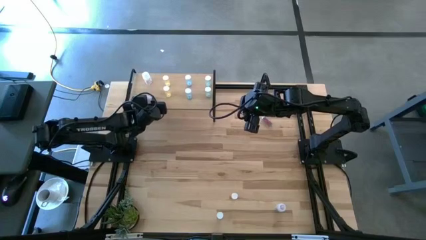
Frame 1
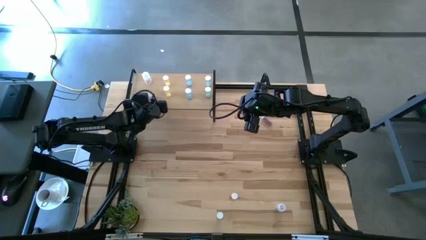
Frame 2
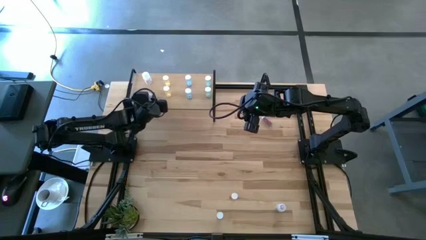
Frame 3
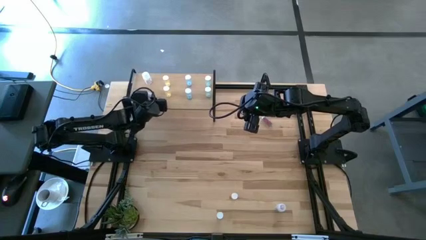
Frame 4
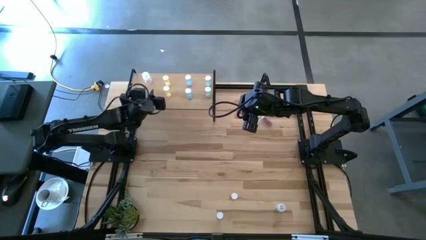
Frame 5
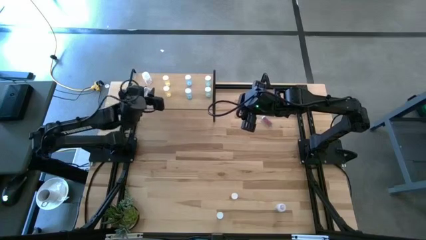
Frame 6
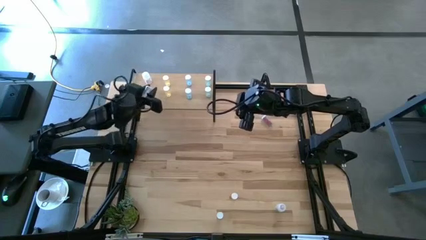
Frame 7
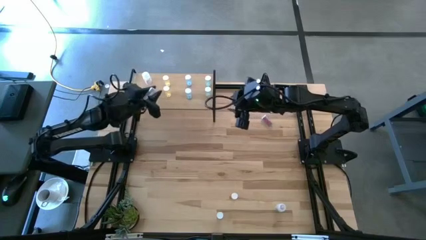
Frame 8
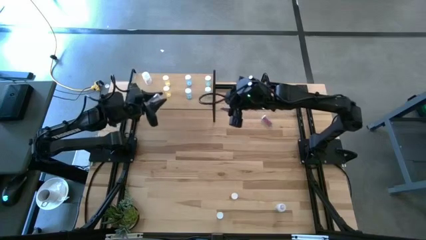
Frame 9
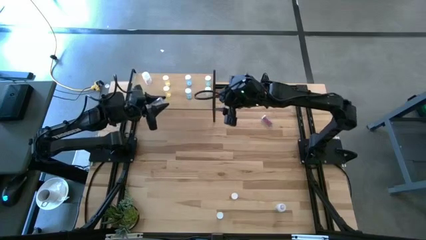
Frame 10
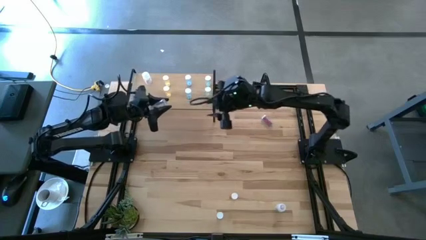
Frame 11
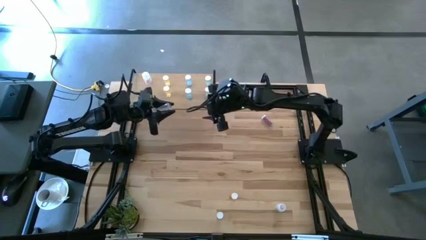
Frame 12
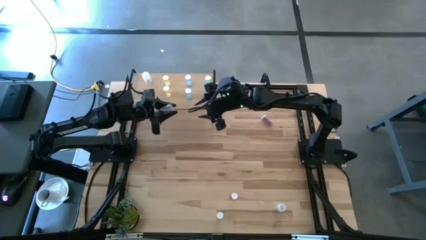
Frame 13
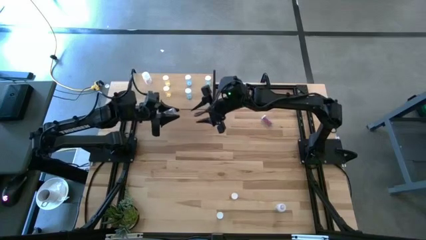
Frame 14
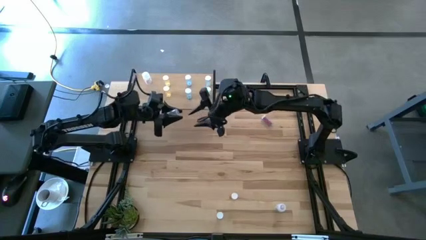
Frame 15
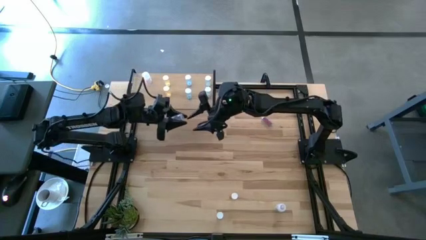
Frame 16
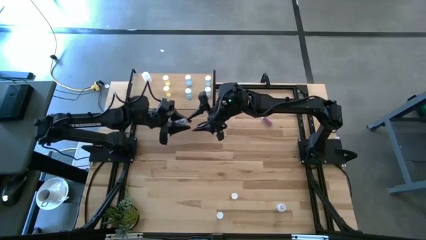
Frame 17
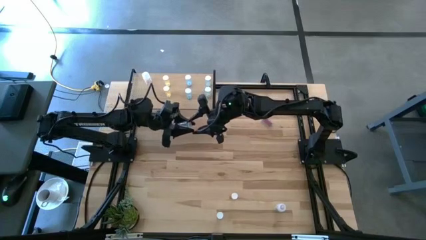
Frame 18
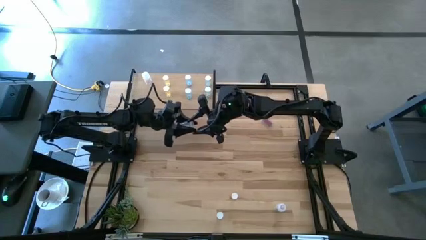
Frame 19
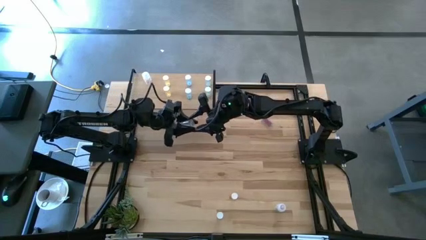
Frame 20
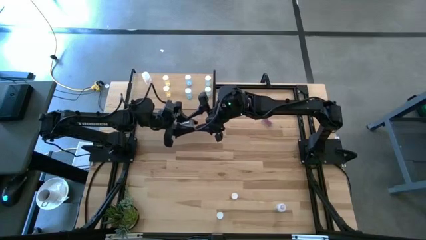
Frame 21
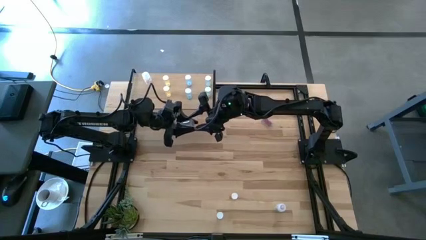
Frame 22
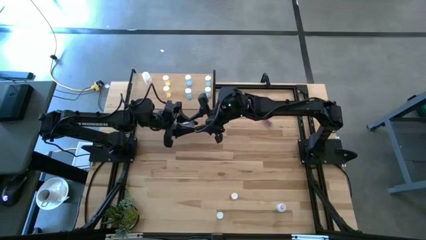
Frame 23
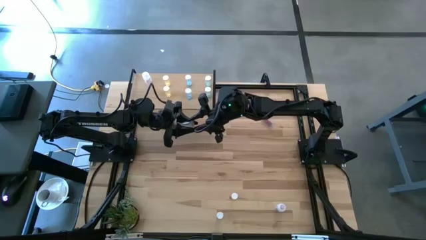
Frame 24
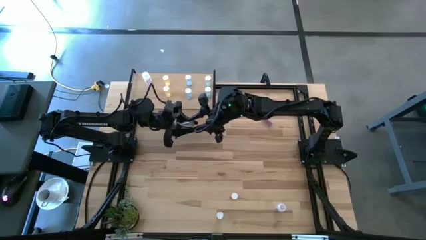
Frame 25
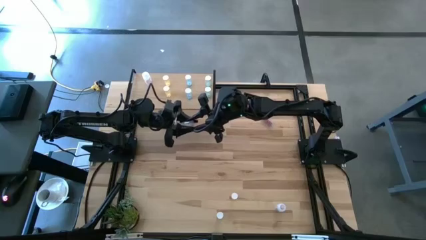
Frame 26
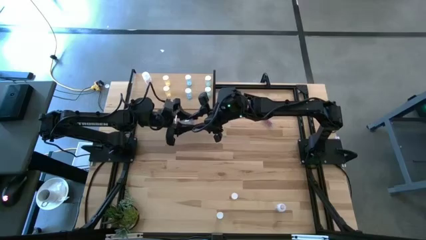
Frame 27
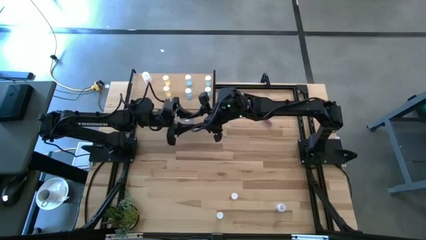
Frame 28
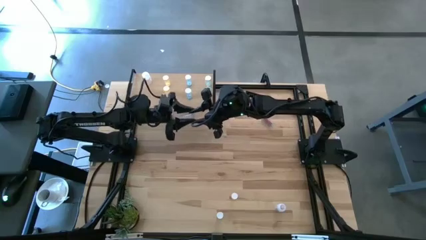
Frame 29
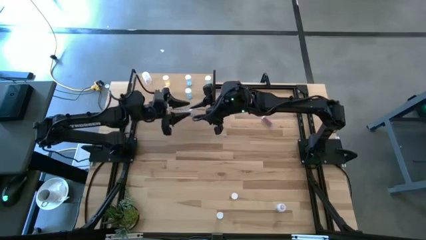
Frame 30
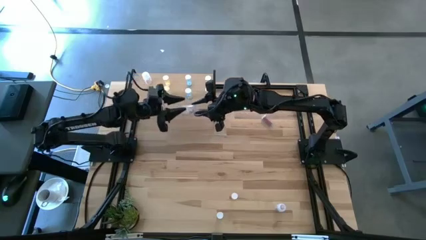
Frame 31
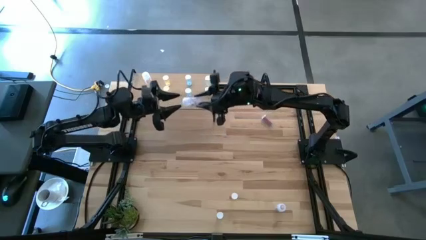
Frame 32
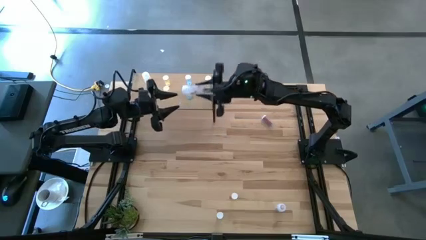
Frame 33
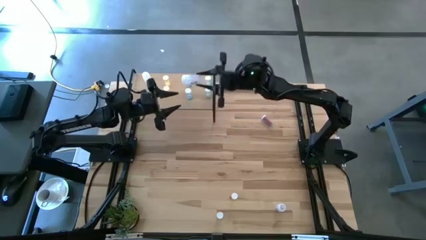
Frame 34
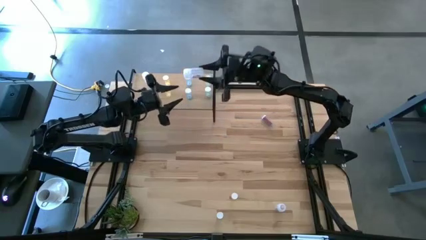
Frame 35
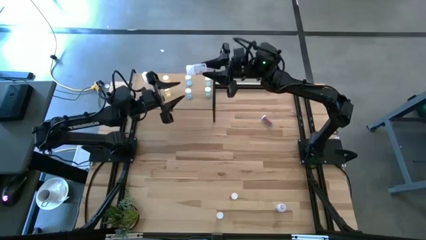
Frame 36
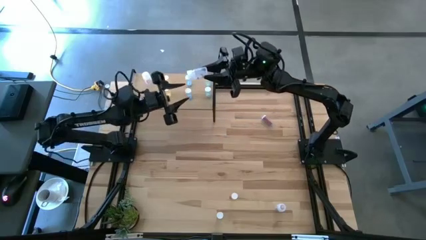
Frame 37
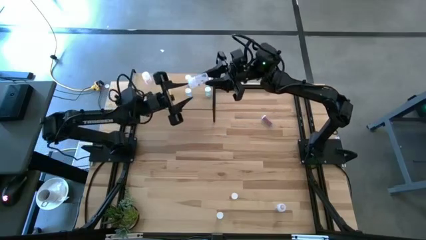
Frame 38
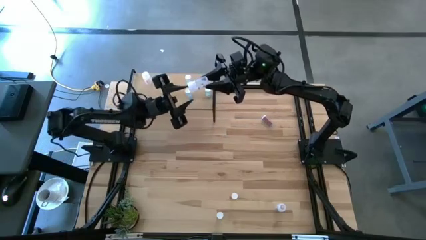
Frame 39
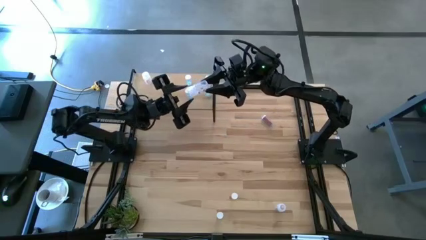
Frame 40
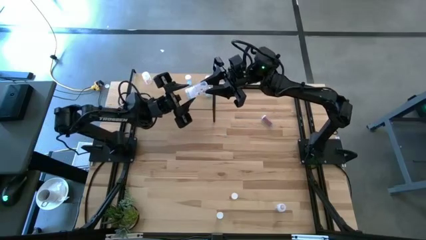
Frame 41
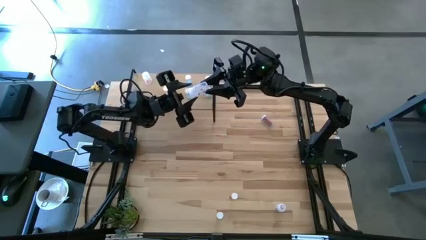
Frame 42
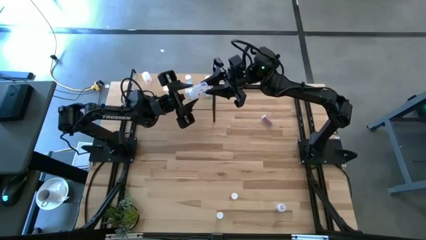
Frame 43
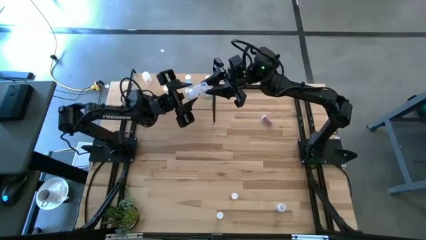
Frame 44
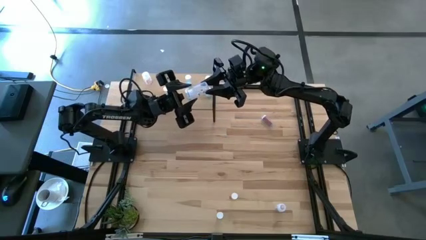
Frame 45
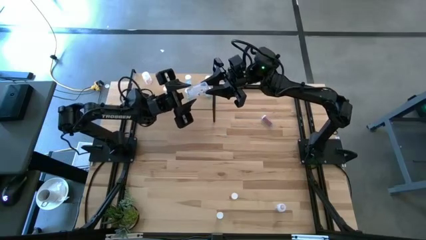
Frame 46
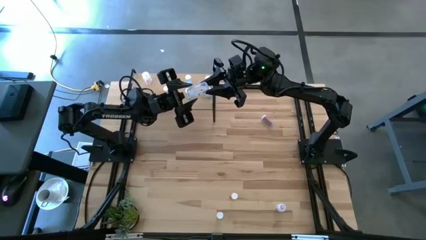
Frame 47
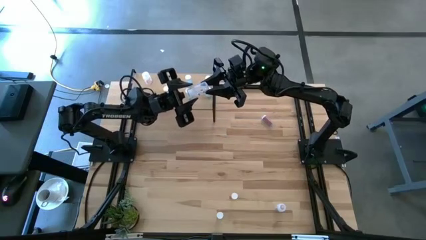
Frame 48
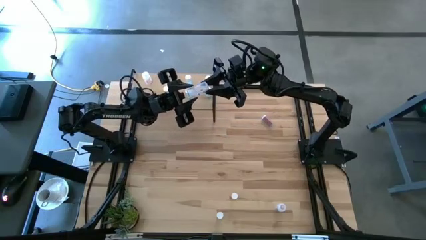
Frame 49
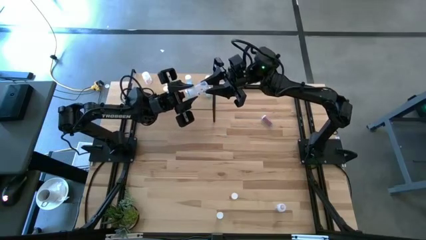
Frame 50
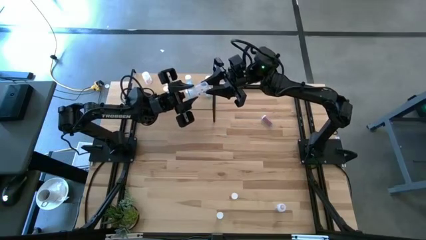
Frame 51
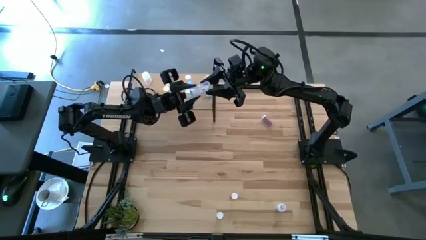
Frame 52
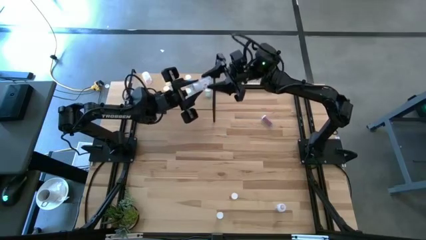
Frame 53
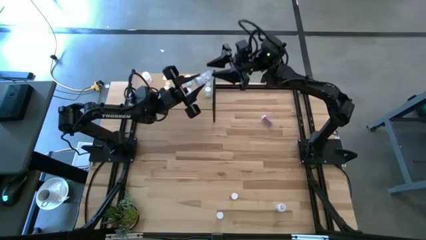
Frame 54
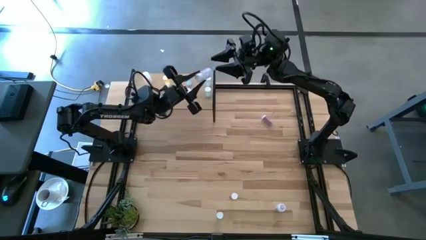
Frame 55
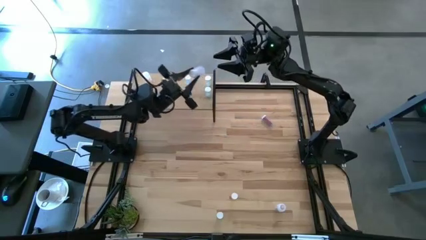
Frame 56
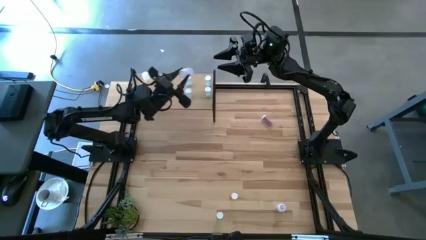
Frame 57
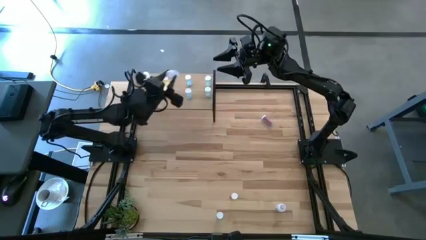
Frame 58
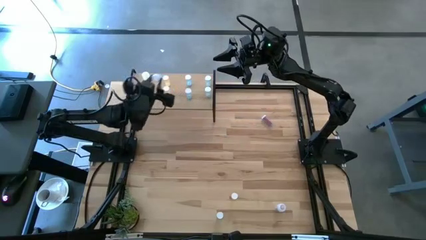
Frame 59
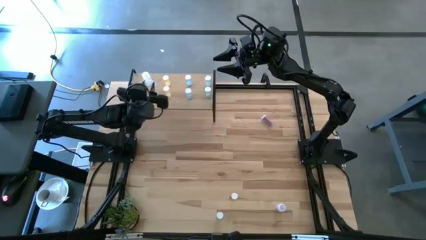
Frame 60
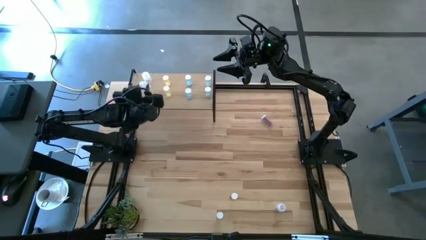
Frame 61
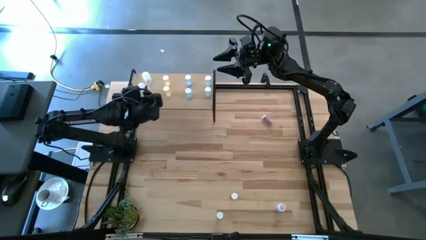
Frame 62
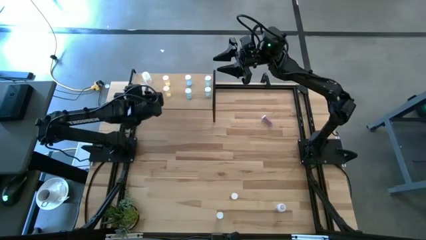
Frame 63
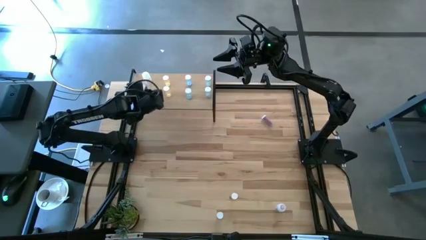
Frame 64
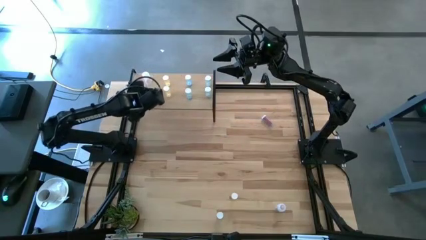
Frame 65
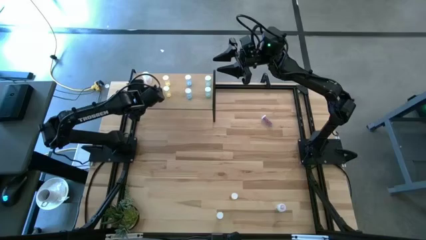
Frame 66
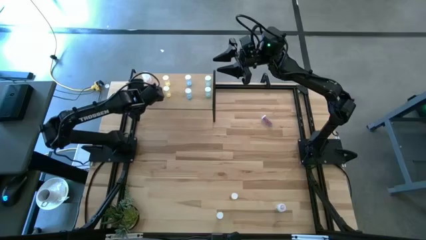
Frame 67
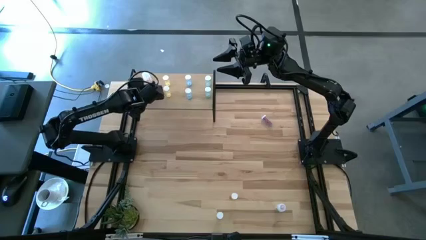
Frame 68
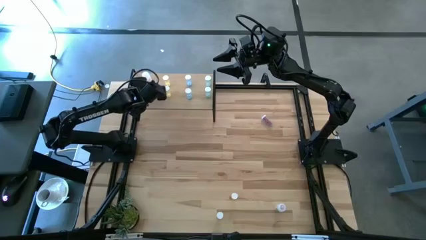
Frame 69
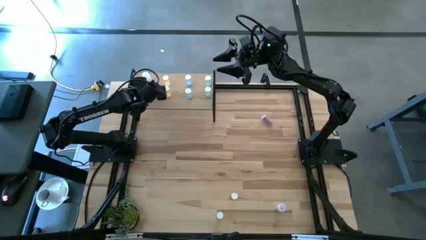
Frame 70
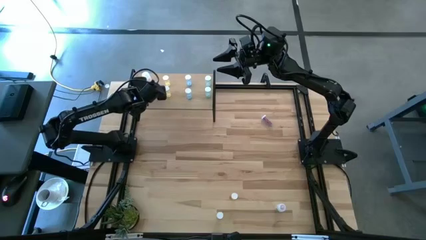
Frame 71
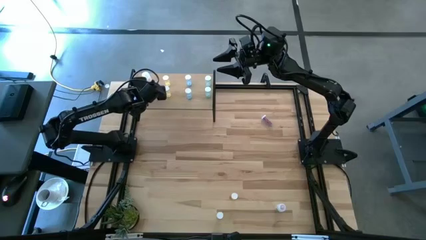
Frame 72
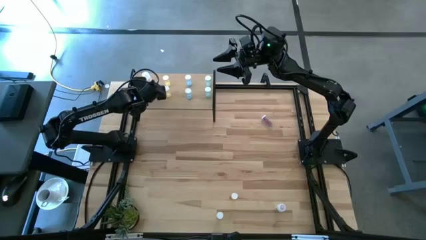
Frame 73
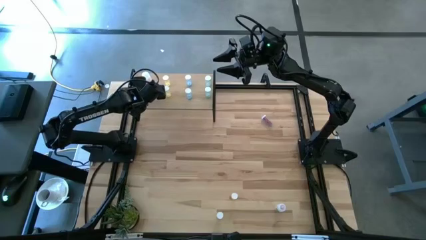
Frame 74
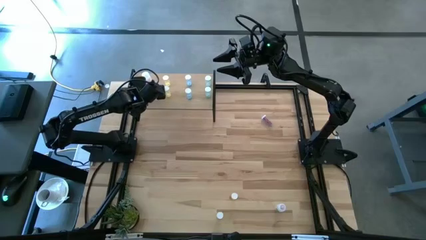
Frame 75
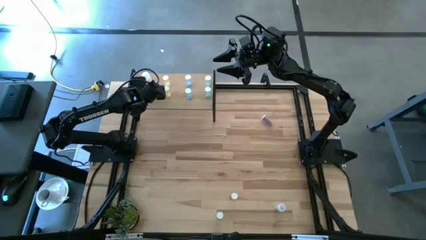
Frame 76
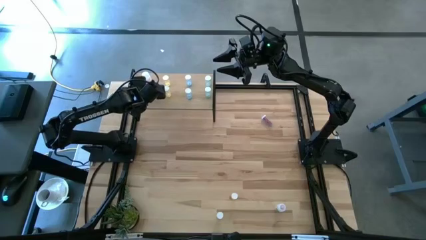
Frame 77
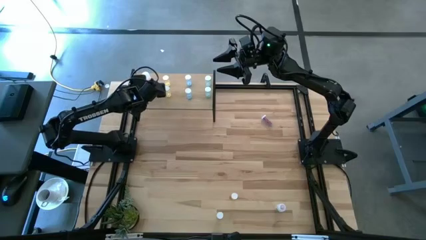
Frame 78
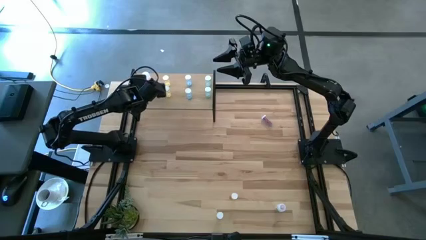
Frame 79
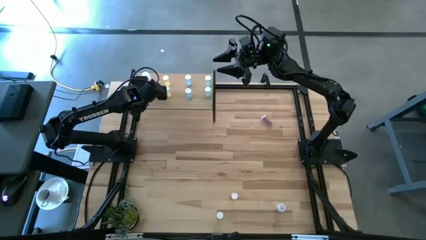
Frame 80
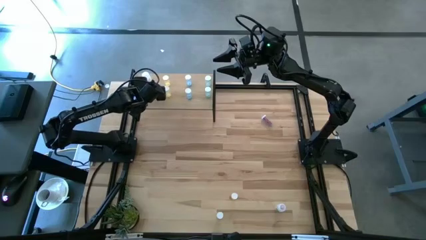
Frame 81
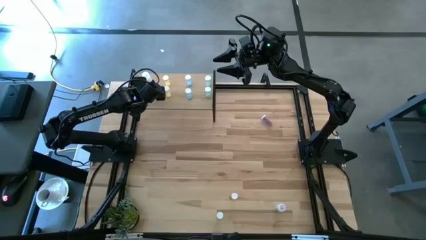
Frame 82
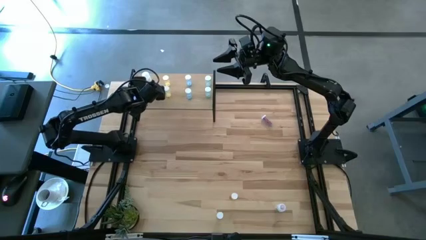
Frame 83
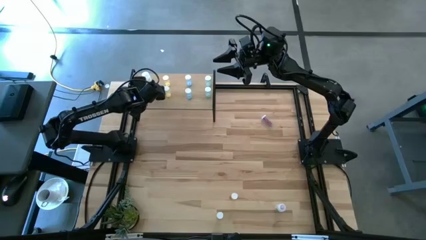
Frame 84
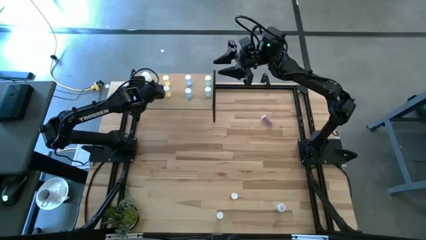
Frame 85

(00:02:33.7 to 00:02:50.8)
Task: Pick and place medicine bottles onto shelf by color
Put the top white pill bottle on the shelf aligned with the other white pill bottle
